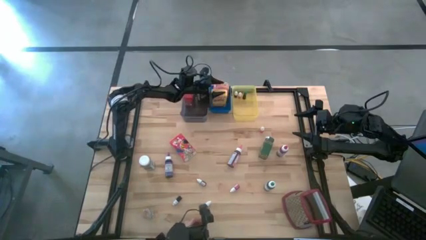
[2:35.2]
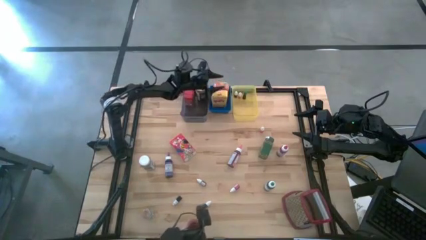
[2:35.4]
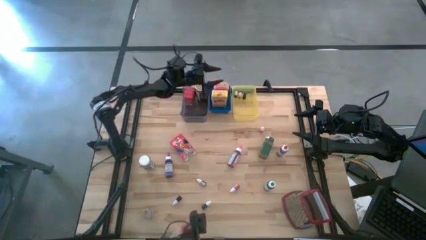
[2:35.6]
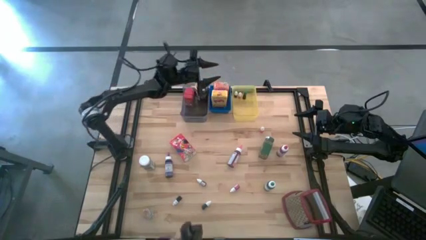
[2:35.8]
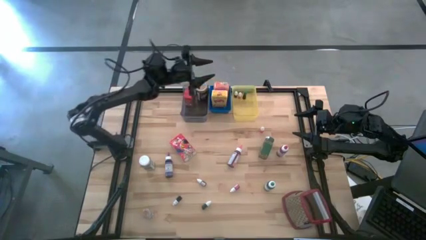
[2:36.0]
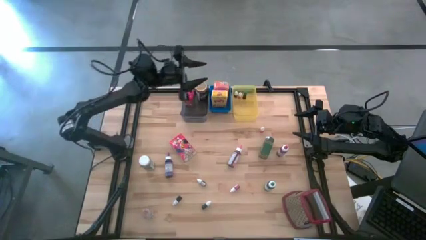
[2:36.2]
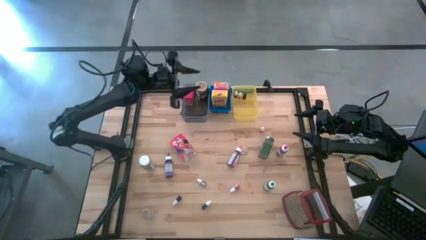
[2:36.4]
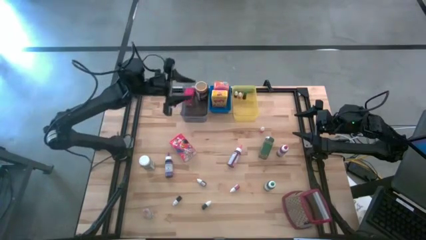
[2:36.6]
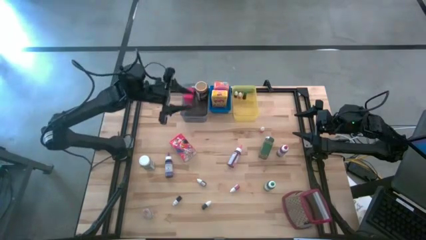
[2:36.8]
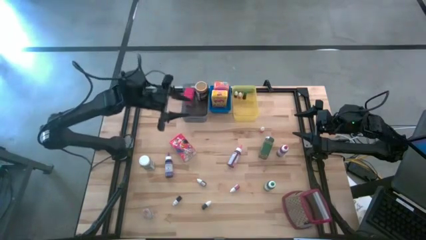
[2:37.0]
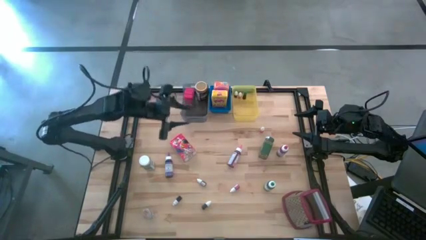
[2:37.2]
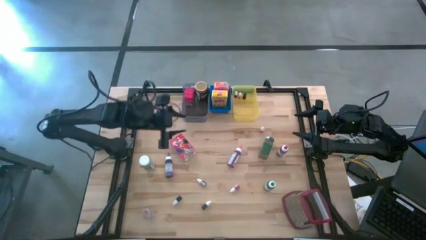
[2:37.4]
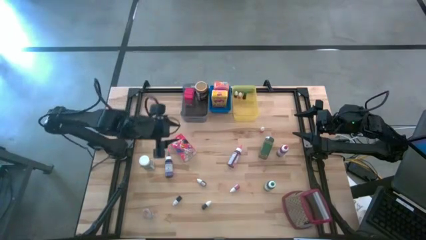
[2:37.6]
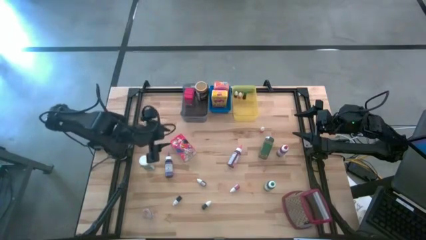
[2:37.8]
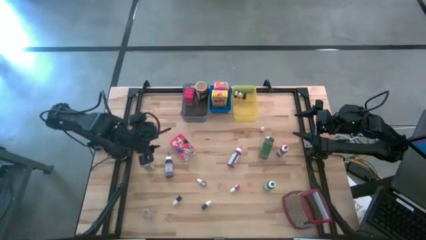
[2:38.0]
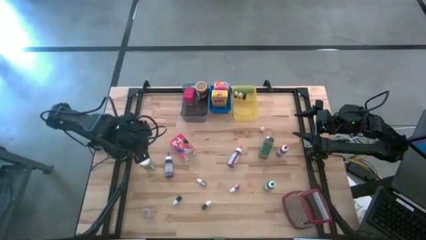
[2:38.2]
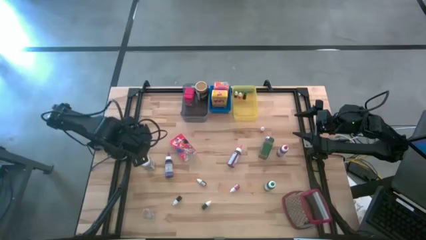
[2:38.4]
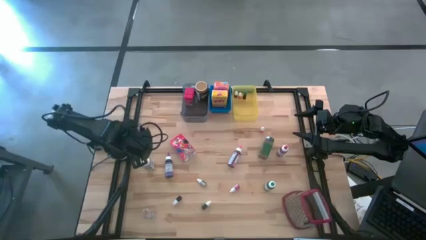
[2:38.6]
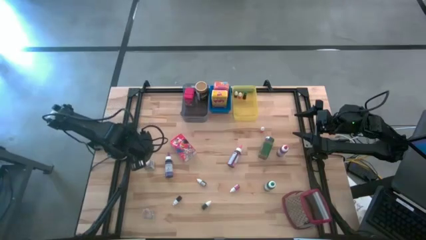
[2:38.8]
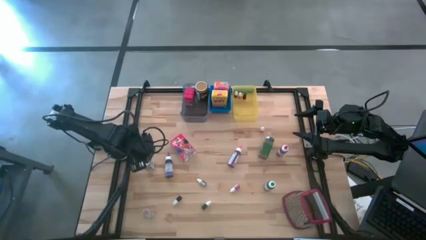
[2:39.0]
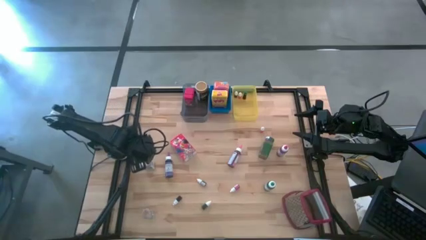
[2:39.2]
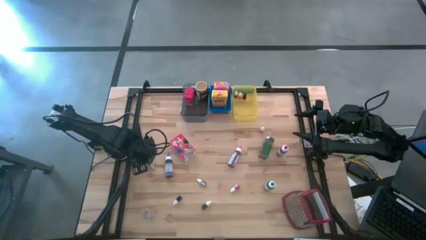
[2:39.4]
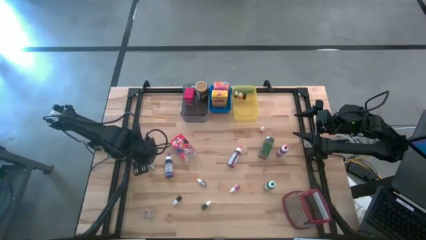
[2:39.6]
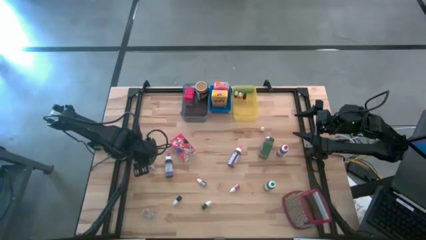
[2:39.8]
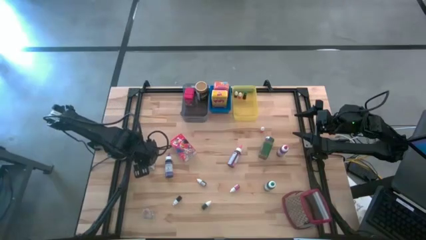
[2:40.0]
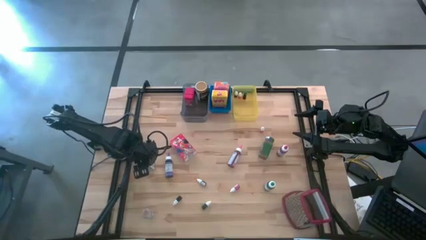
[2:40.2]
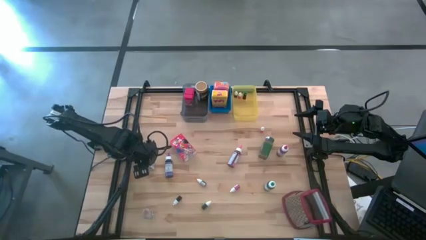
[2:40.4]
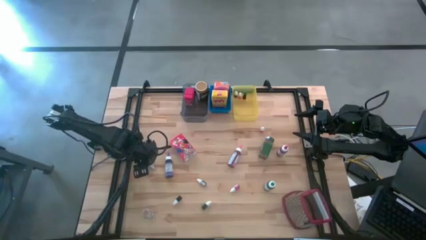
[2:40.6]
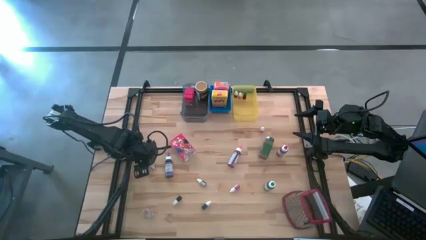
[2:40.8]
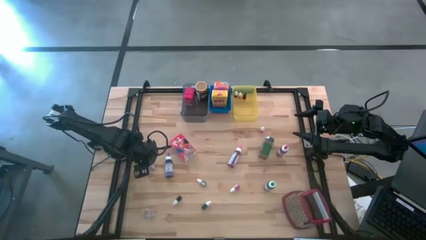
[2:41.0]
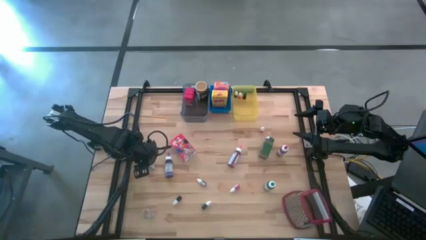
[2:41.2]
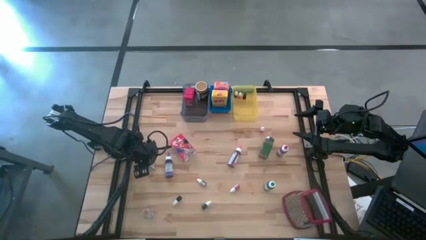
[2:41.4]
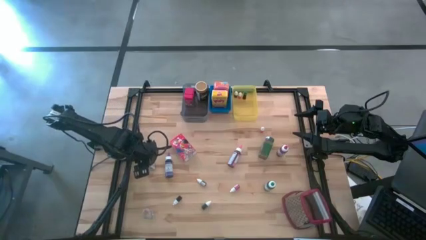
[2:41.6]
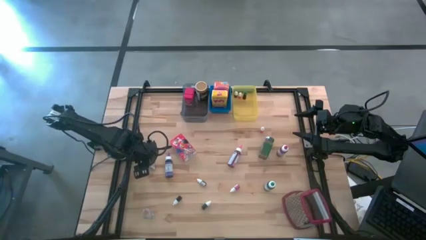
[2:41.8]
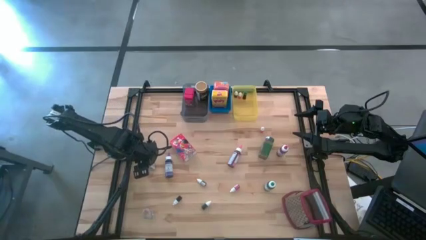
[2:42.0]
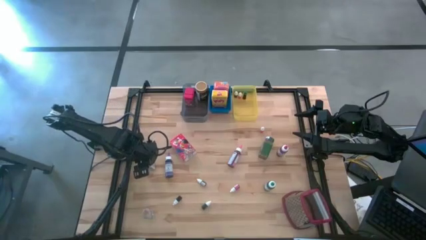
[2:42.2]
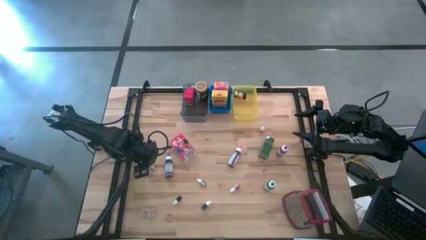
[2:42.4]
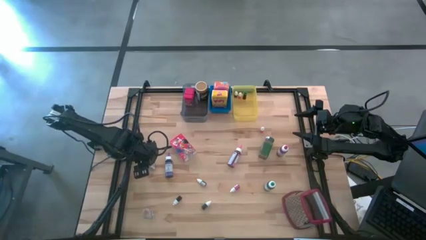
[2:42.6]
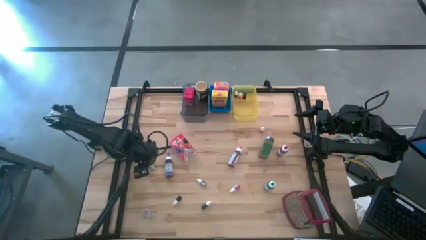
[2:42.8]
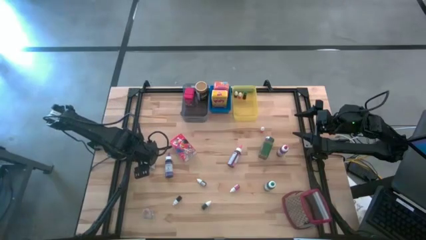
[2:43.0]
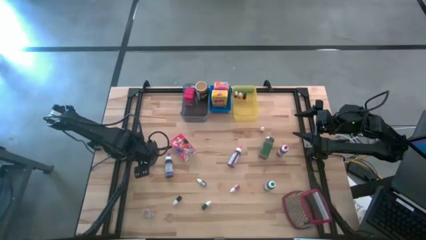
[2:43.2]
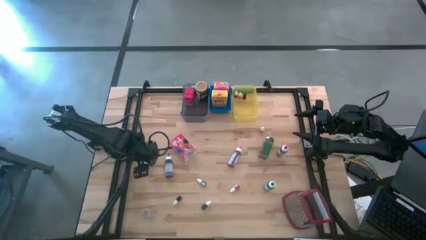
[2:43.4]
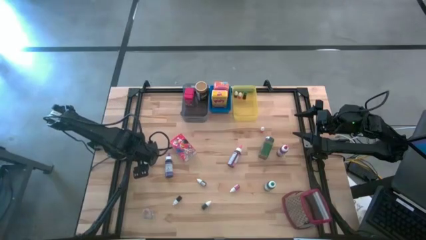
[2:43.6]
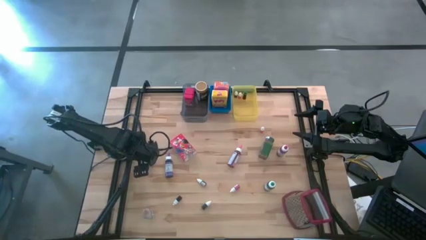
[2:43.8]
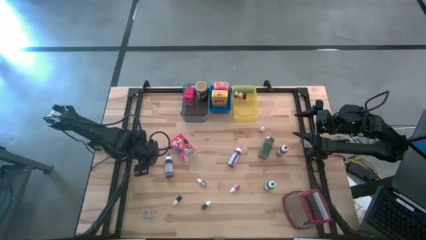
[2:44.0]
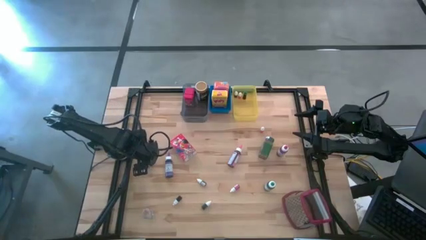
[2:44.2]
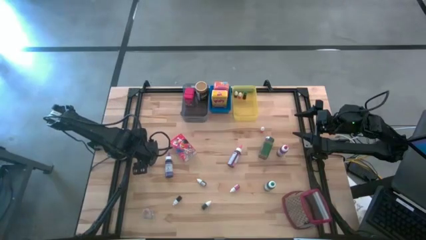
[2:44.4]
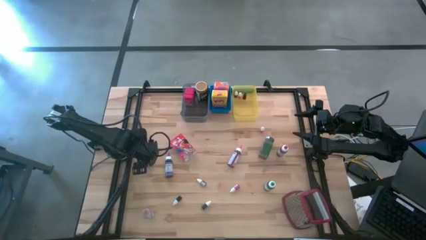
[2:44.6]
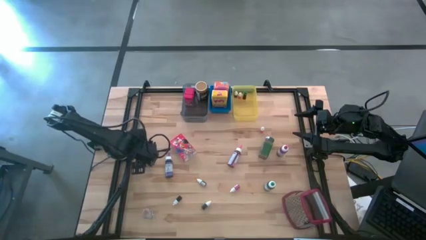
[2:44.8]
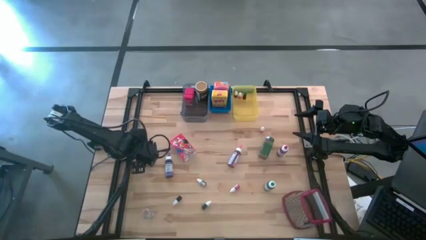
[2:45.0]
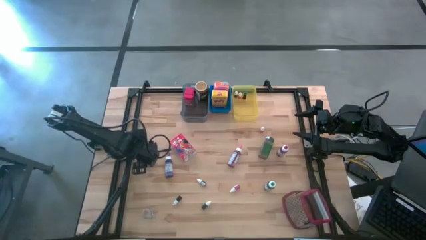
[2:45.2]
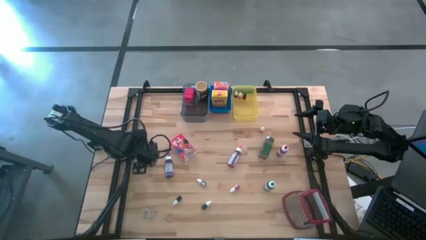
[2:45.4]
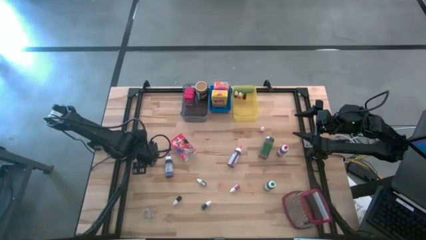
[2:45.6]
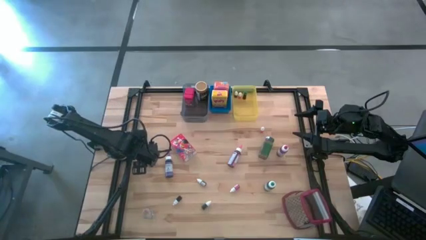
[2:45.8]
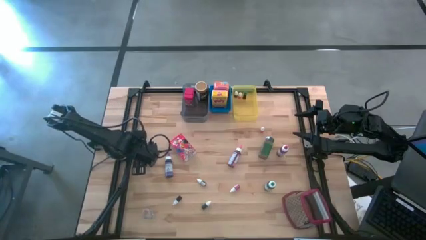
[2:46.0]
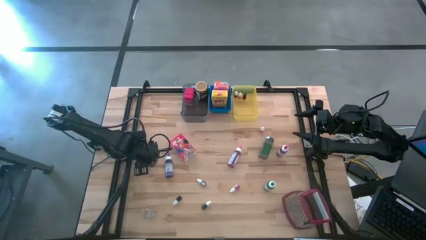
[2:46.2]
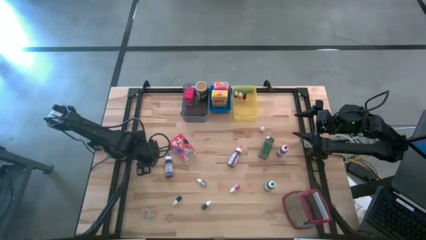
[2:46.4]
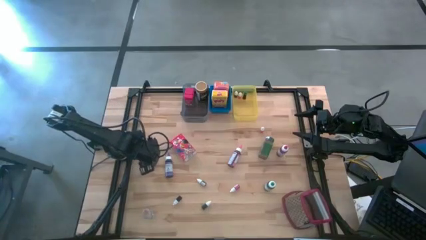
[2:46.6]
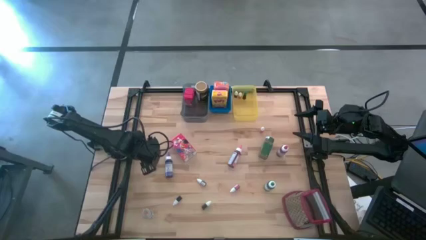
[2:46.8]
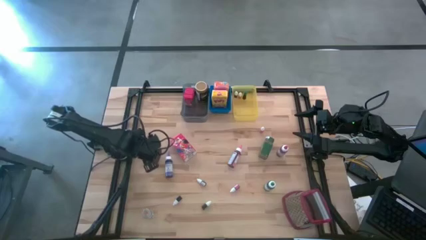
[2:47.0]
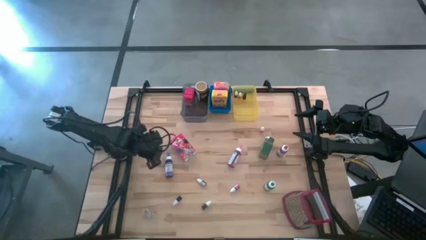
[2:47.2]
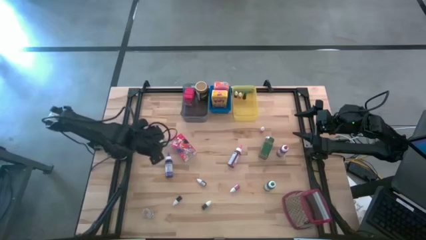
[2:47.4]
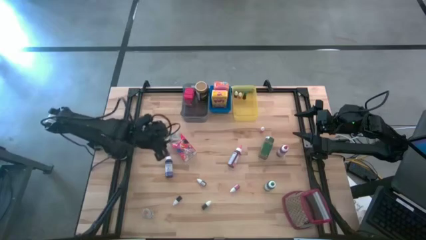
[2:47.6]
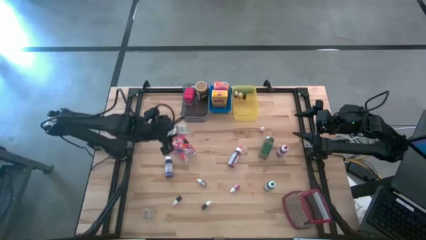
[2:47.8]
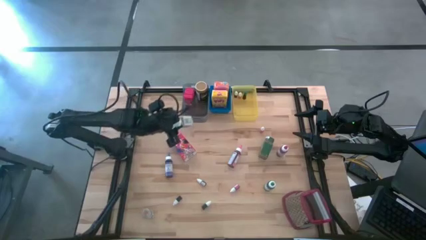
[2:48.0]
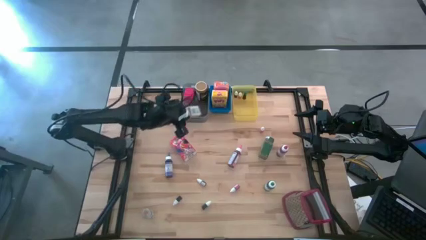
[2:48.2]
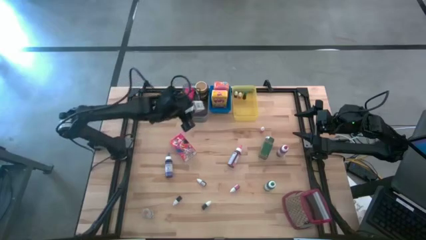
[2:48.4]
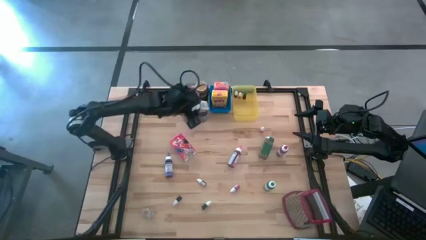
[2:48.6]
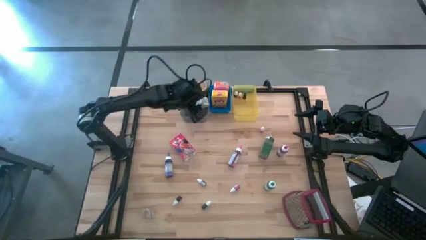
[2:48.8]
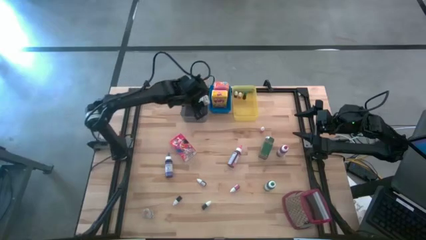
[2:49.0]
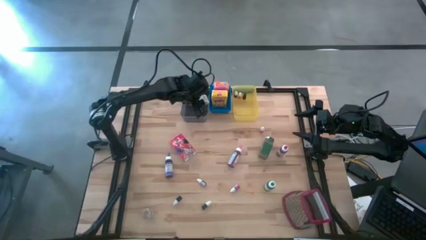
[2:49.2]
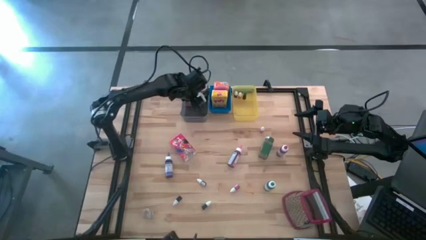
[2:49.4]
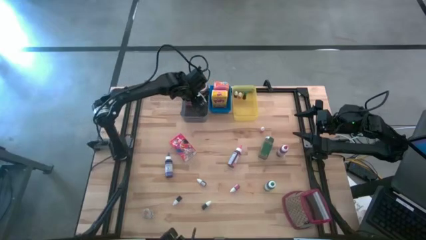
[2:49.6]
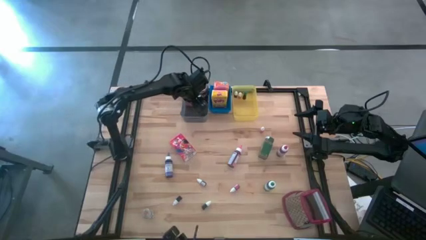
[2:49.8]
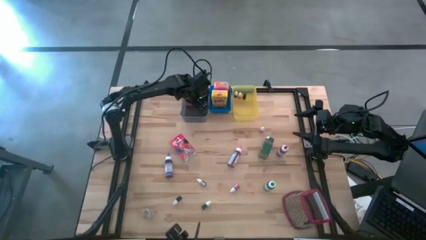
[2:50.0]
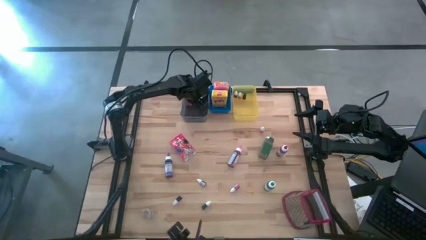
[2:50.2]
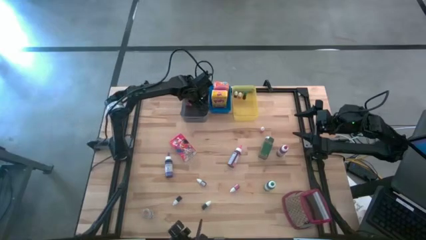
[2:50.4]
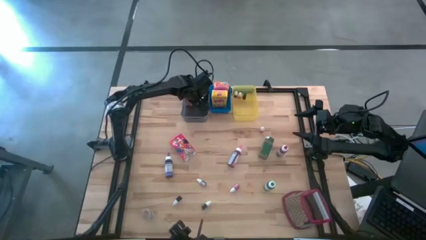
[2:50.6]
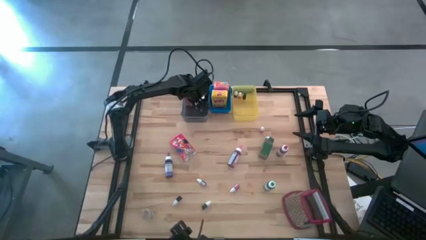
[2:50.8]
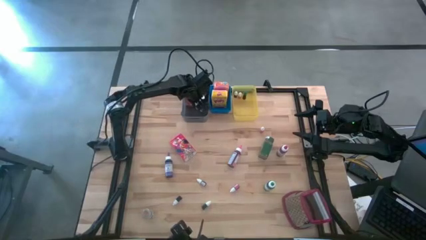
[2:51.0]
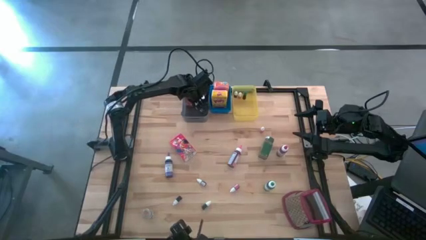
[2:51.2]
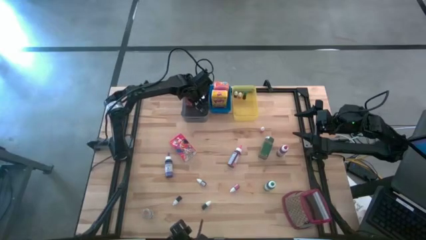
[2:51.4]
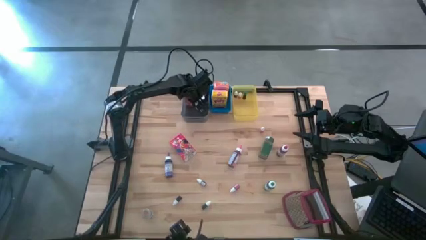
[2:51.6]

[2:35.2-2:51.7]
Task: Pick & Place Kitchen Items
Put the white spice bottle into the black bin
